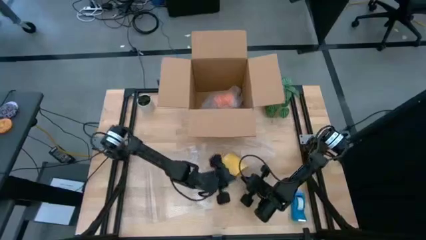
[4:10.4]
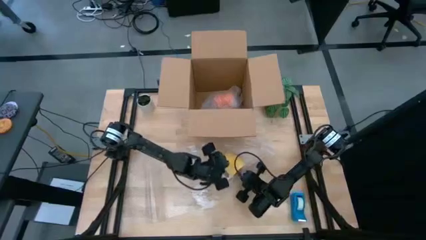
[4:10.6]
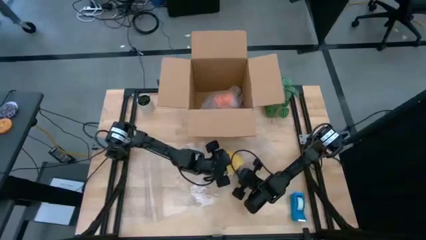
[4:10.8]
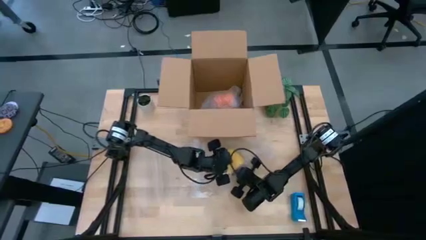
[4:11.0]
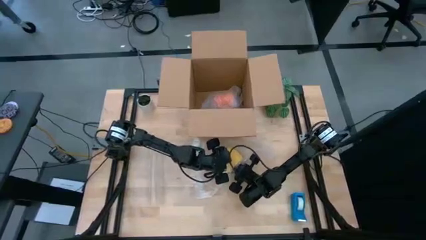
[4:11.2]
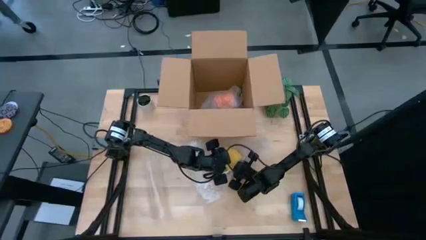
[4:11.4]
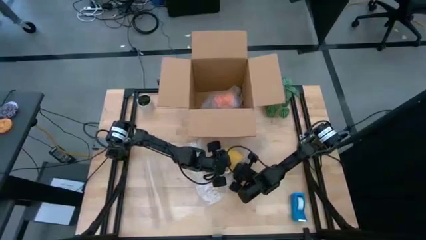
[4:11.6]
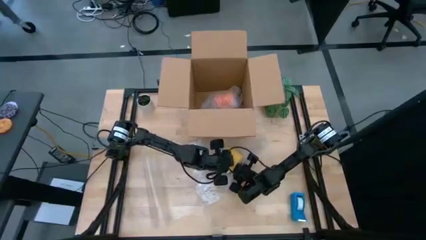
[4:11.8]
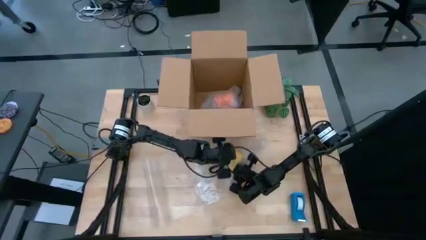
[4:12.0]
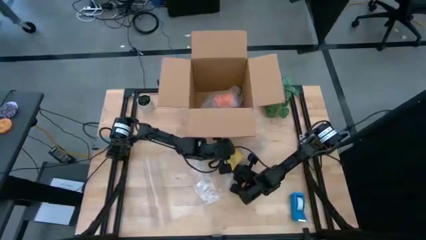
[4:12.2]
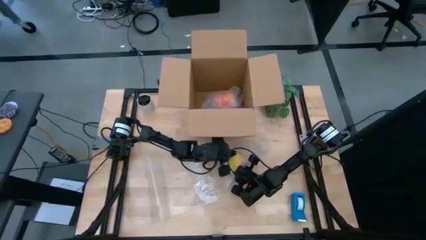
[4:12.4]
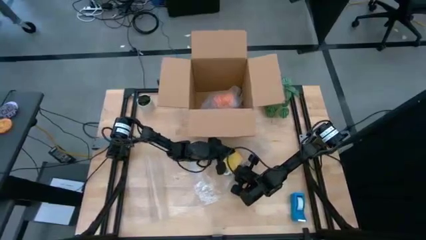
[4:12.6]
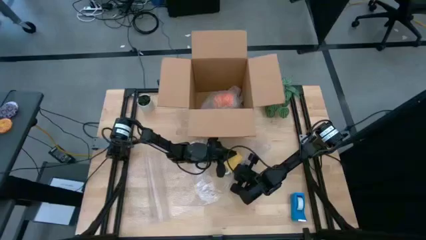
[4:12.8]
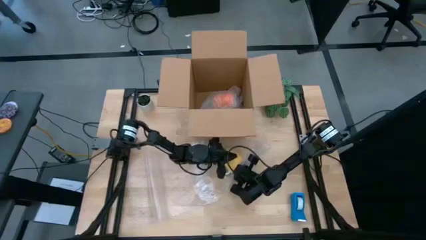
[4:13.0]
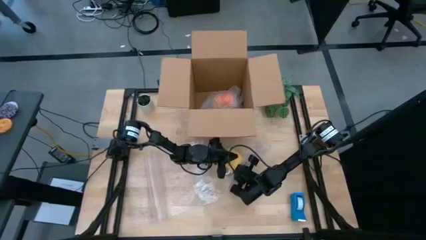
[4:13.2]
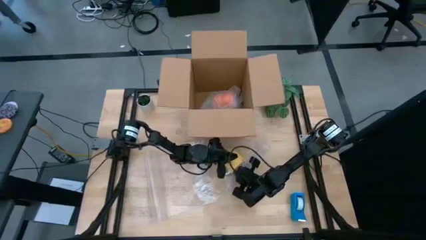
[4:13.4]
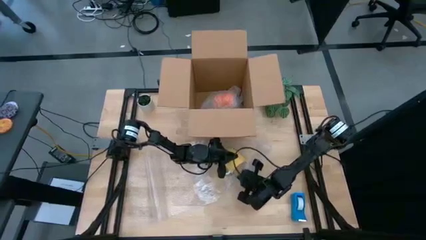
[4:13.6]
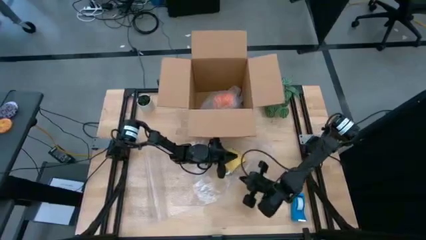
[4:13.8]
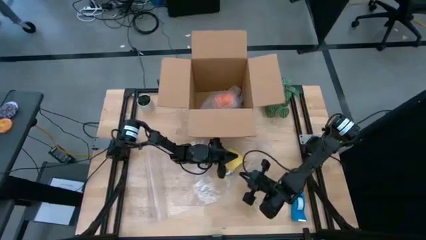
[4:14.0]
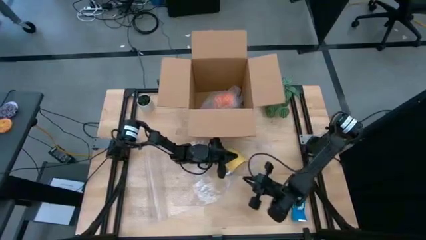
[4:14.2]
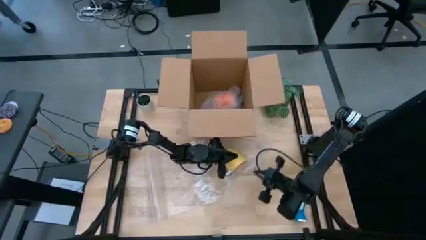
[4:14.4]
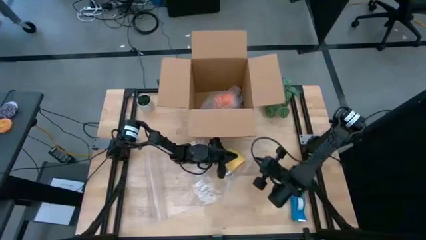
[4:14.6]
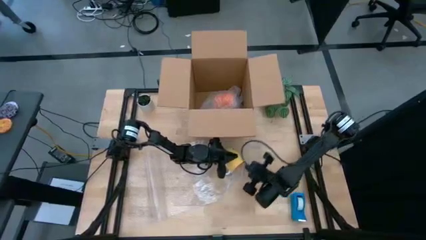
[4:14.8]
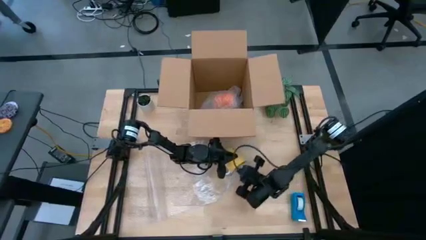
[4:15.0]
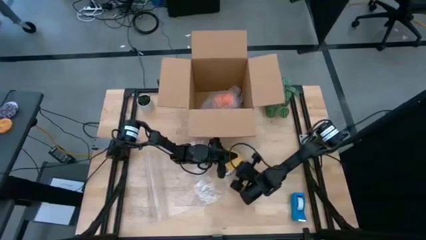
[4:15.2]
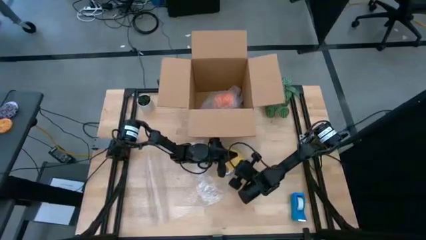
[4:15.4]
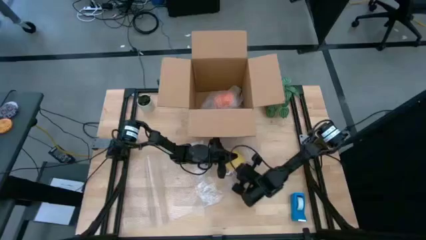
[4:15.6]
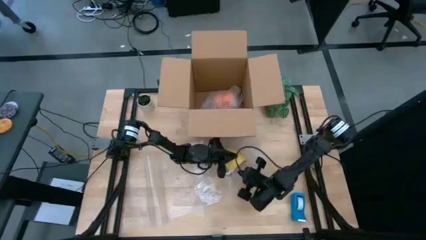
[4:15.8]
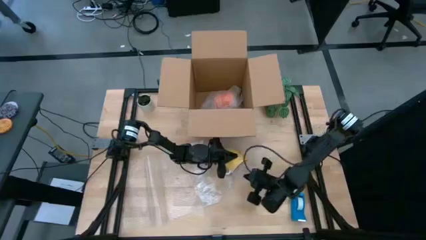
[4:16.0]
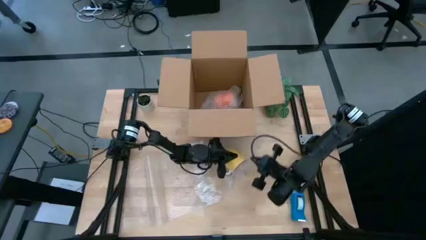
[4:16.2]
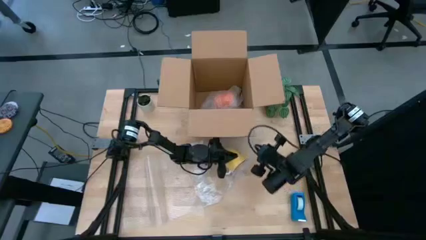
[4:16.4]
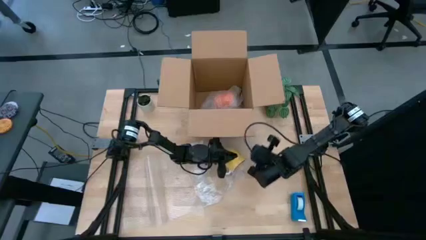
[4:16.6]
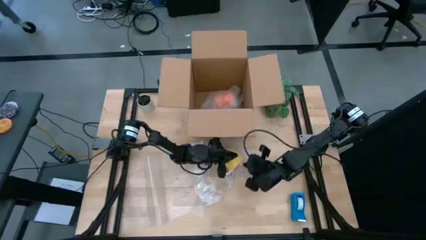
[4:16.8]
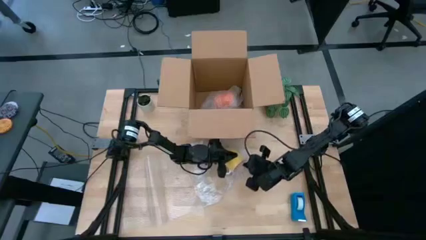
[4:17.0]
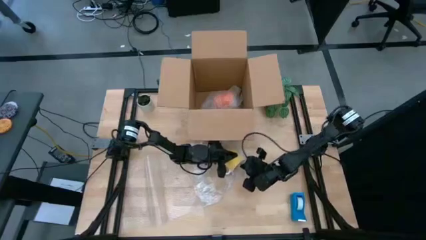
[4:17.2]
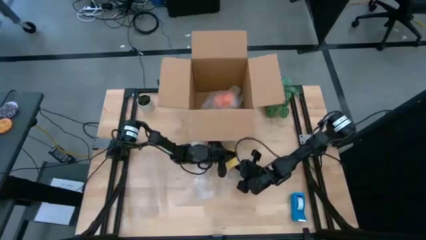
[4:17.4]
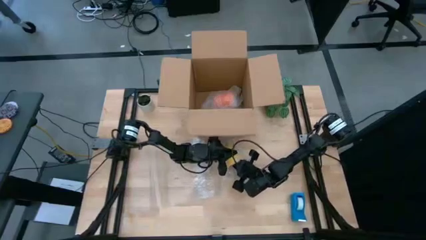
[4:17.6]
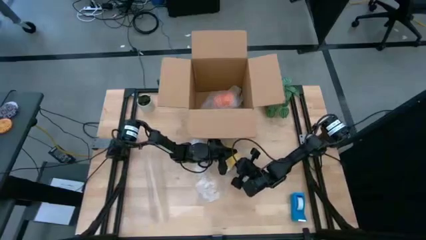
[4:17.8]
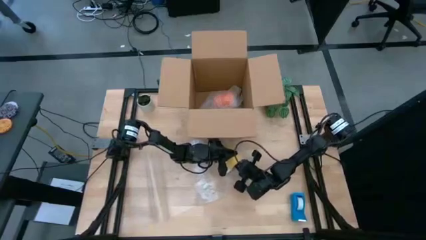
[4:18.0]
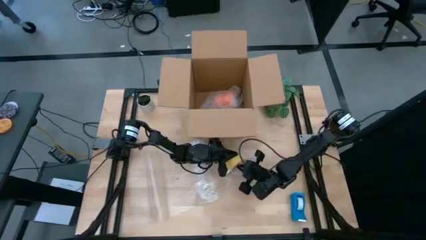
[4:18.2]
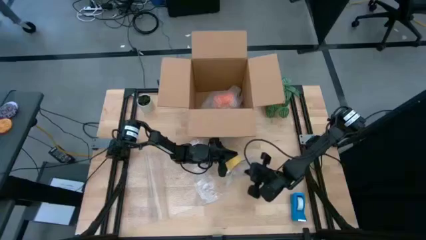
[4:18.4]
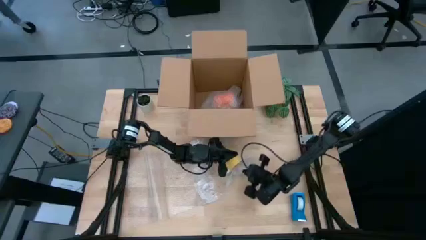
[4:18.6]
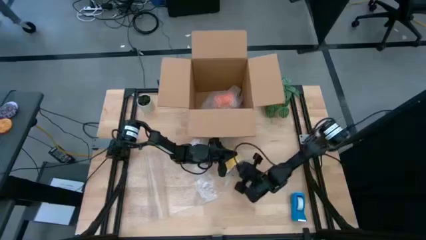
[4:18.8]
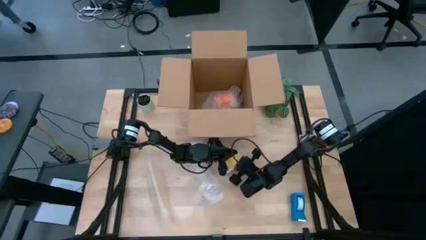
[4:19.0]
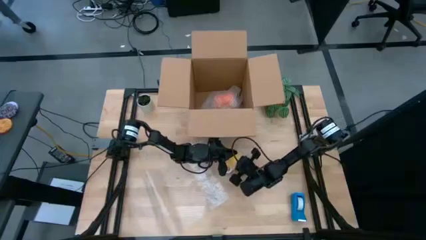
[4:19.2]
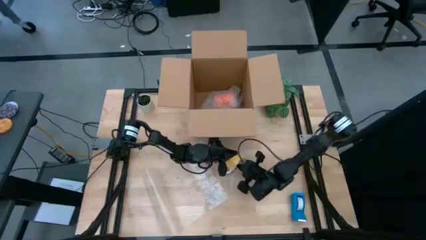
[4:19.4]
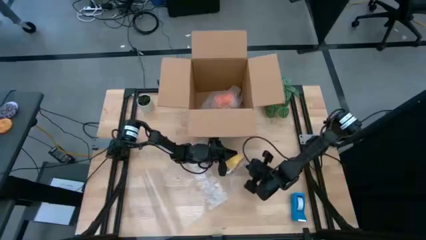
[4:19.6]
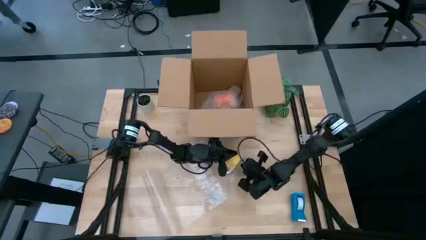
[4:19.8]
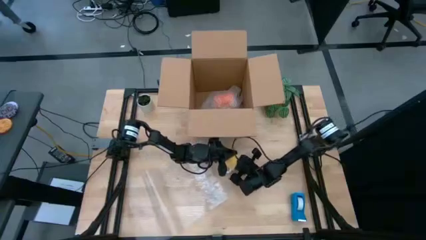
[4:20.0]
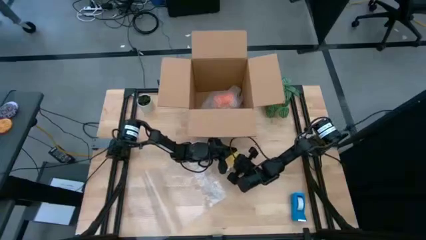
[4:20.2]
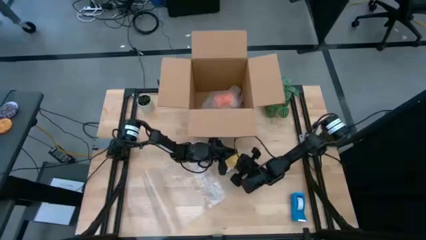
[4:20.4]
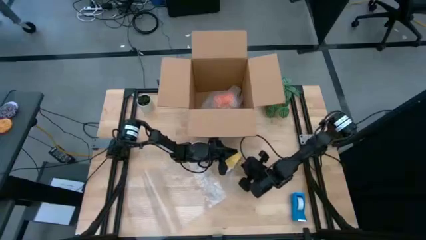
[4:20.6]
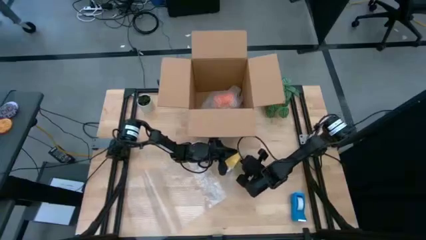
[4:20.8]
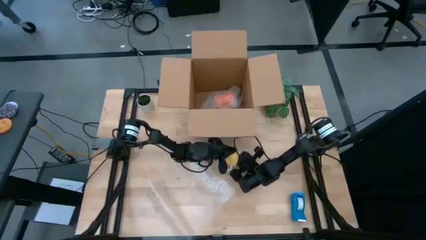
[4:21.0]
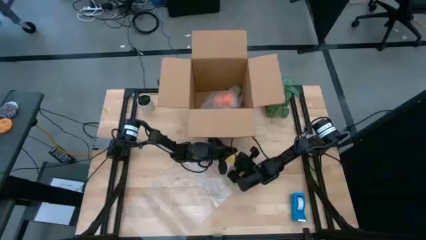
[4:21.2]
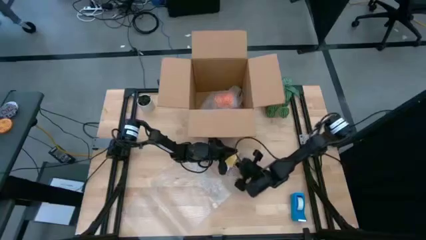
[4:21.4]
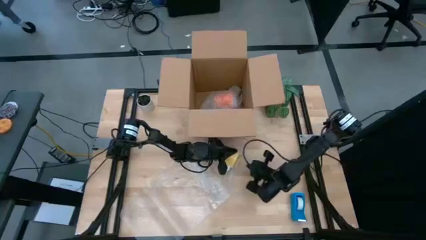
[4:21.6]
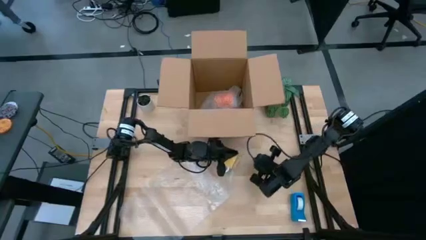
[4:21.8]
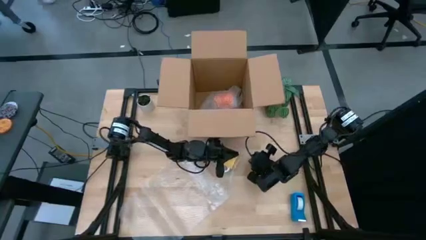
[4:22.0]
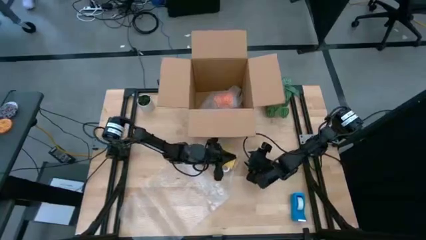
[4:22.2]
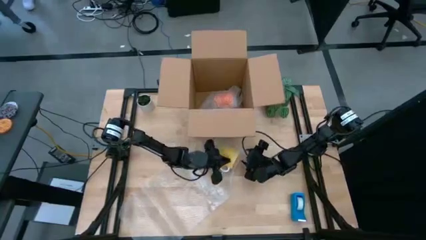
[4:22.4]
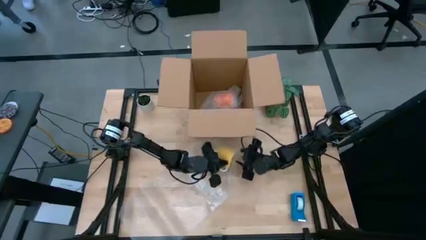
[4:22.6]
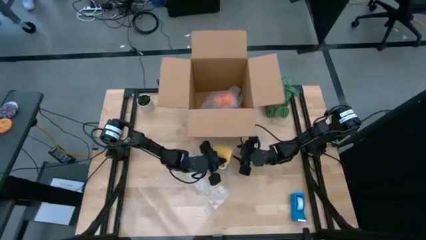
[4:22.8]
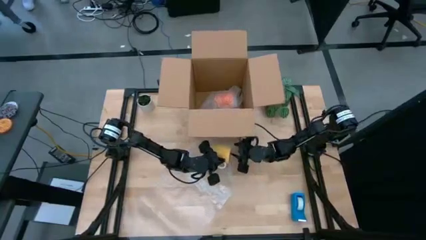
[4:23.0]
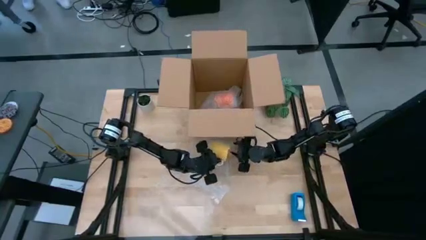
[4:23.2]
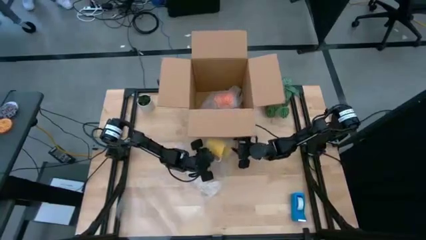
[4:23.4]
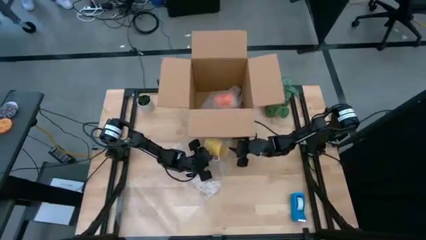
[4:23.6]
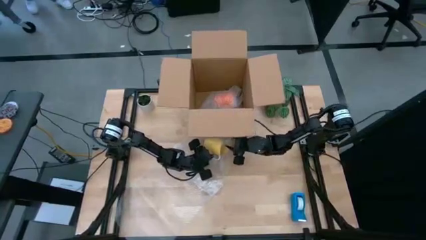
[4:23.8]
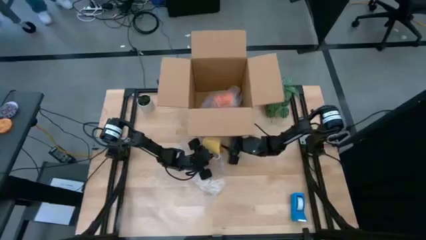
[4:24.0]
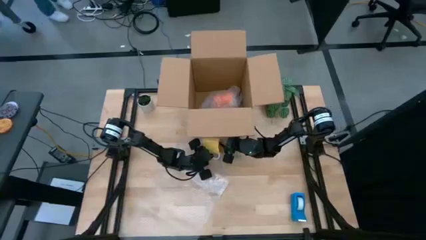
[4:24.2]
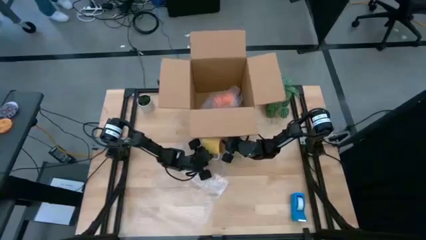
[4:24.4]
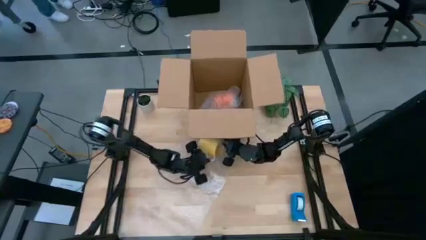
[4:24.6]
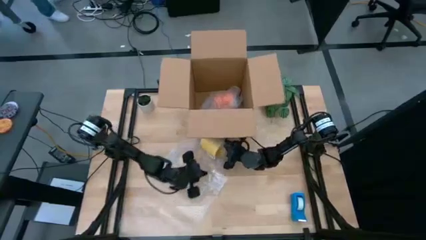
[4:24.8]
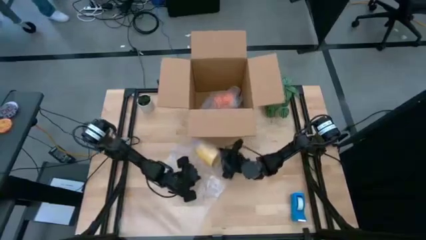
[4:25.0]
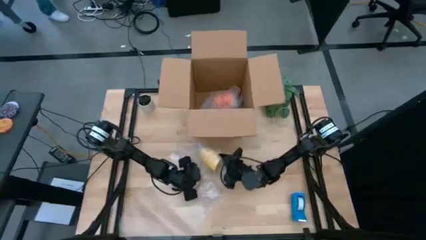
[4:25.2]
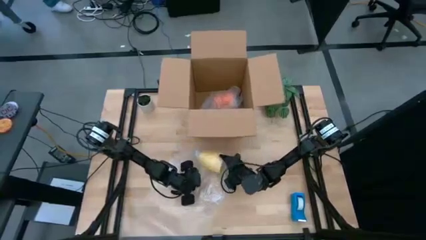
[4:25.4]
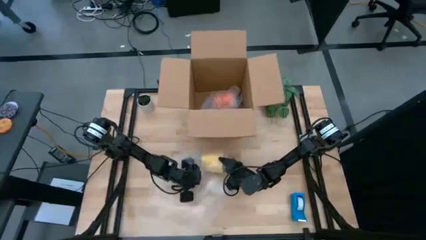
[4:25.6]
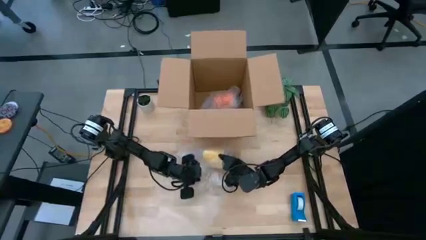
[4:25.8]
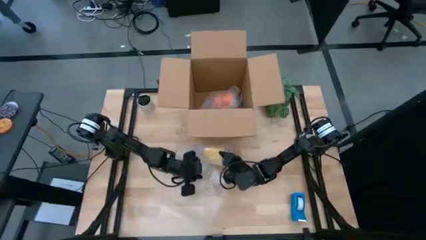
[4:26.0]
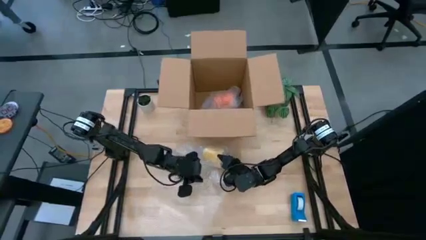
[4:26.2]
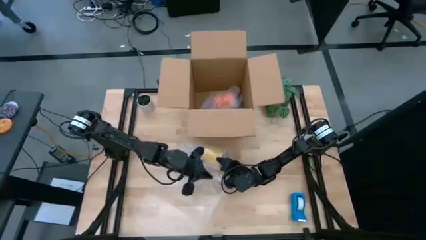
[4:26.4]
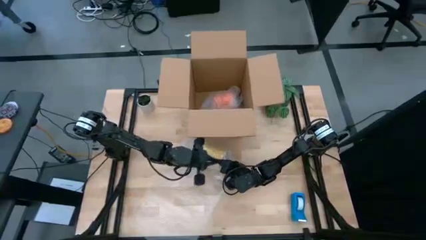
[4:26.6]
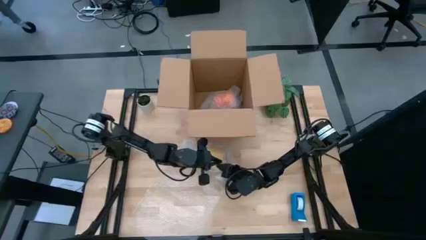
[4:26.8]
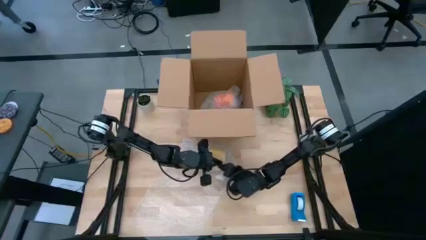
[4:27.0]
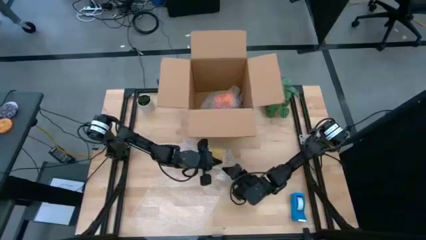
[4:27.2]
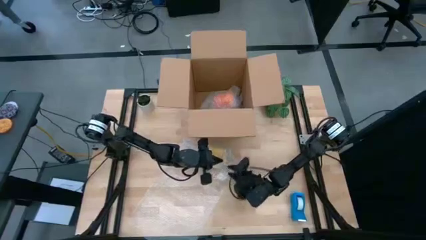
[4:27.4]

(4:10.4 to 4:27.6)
Task: wrap mug
Wrap the yellow mug with the bubble wrap
